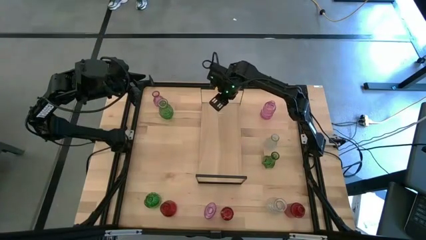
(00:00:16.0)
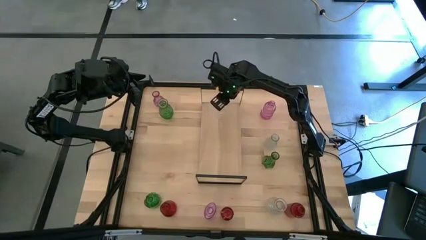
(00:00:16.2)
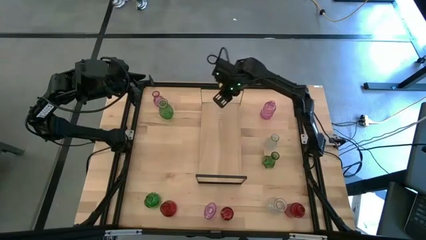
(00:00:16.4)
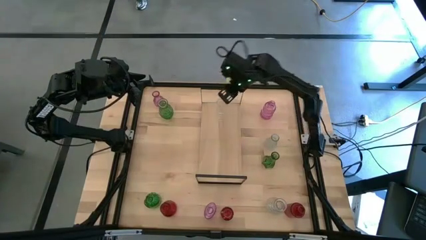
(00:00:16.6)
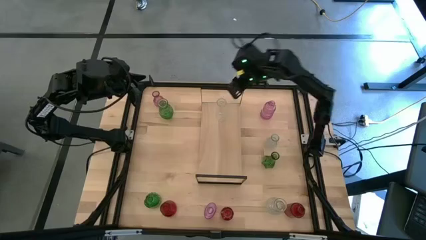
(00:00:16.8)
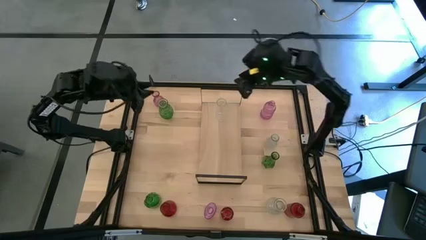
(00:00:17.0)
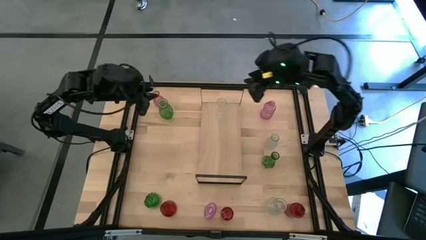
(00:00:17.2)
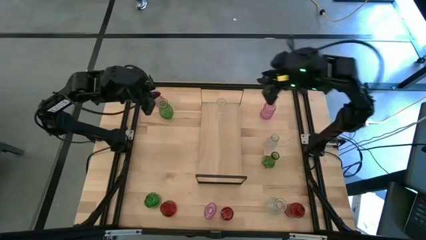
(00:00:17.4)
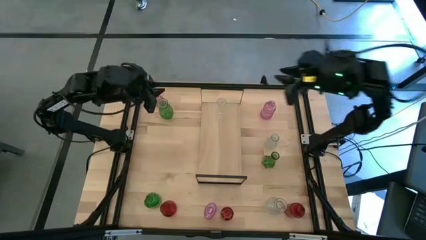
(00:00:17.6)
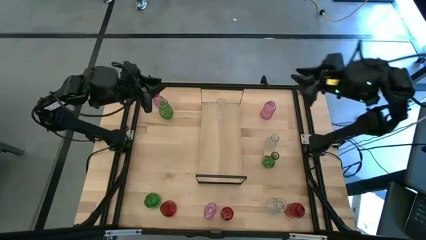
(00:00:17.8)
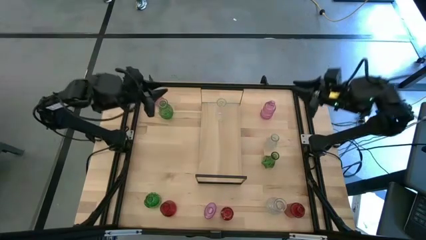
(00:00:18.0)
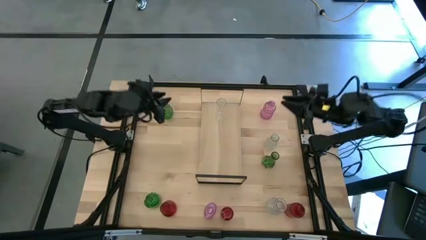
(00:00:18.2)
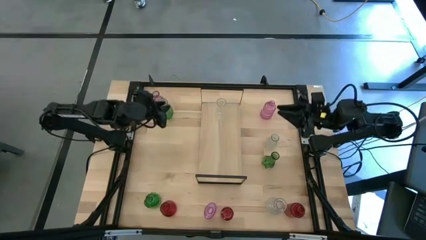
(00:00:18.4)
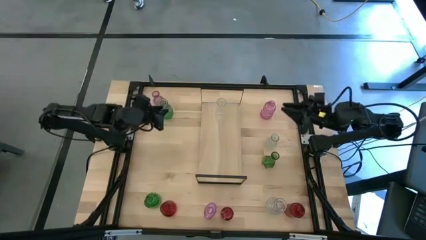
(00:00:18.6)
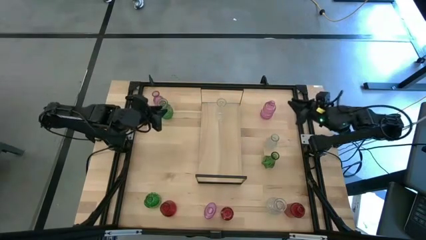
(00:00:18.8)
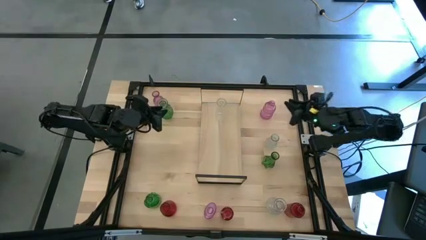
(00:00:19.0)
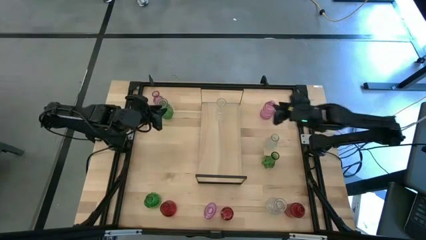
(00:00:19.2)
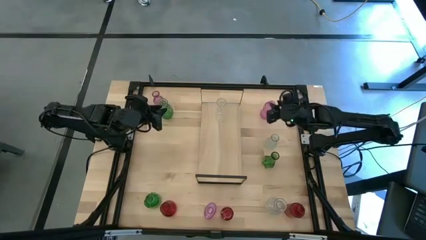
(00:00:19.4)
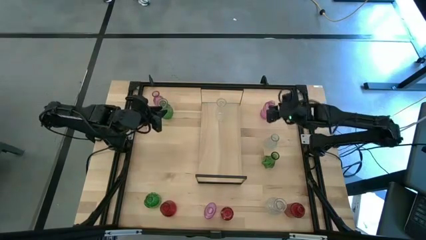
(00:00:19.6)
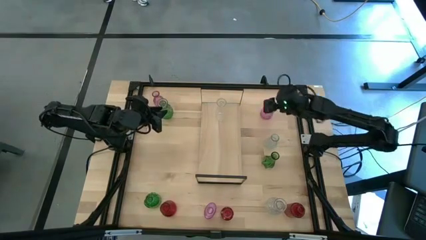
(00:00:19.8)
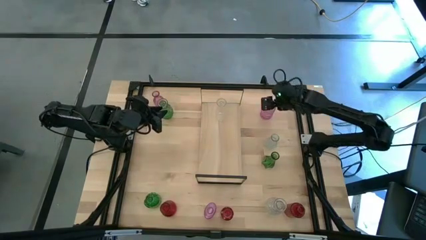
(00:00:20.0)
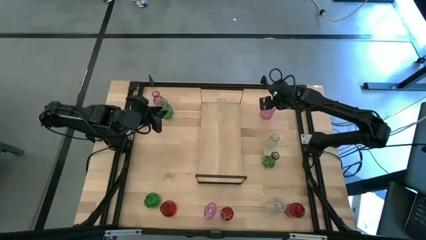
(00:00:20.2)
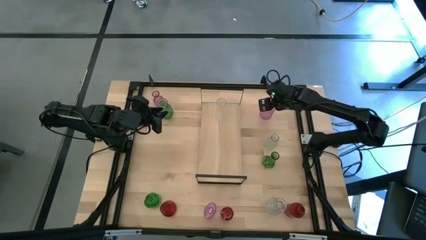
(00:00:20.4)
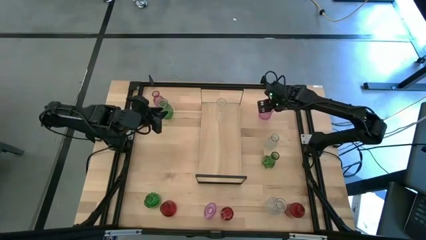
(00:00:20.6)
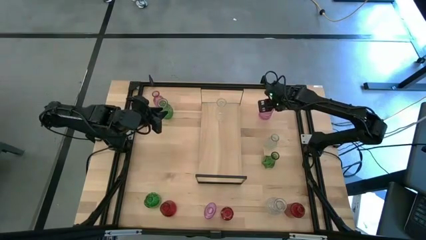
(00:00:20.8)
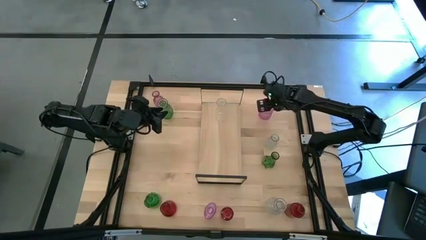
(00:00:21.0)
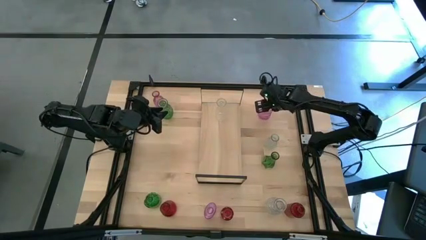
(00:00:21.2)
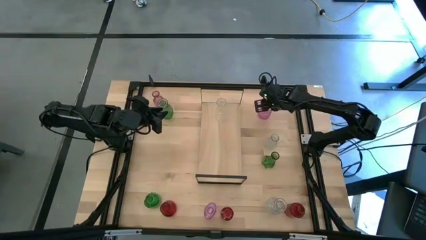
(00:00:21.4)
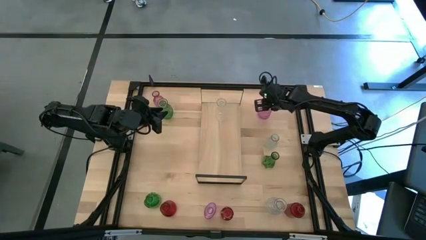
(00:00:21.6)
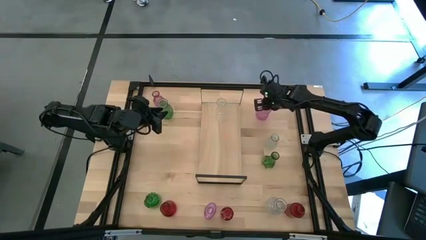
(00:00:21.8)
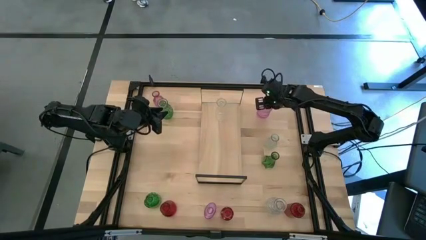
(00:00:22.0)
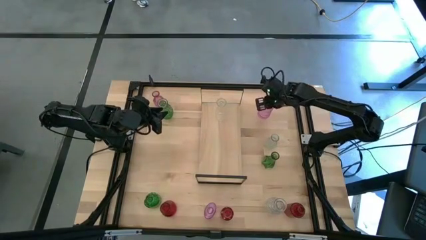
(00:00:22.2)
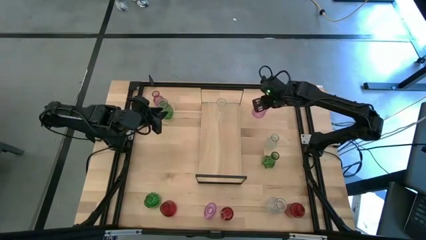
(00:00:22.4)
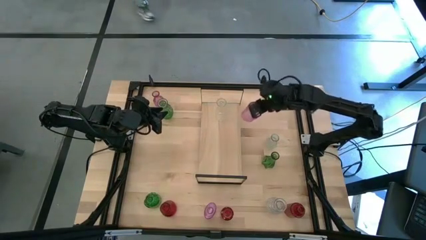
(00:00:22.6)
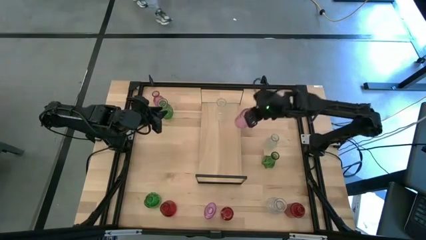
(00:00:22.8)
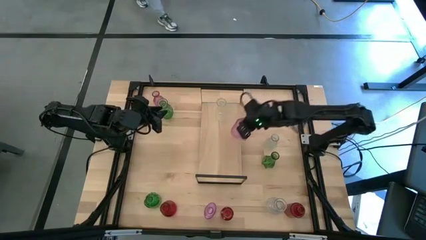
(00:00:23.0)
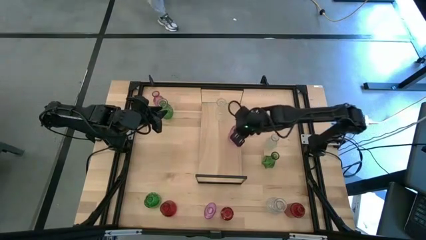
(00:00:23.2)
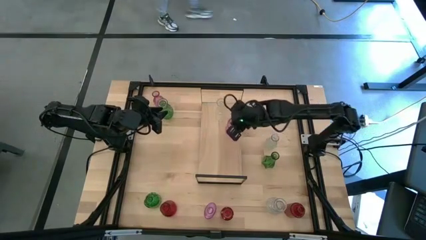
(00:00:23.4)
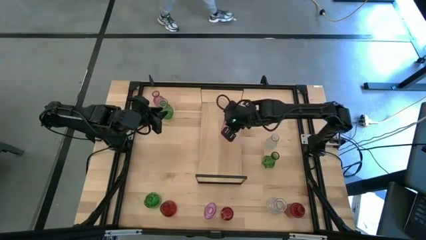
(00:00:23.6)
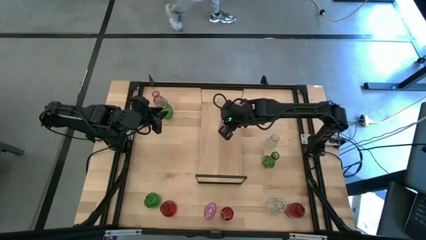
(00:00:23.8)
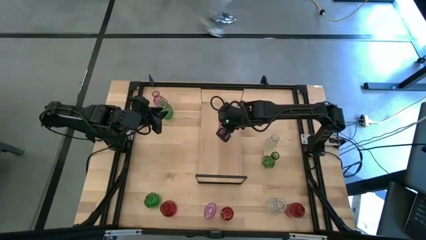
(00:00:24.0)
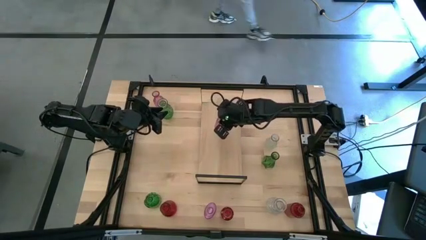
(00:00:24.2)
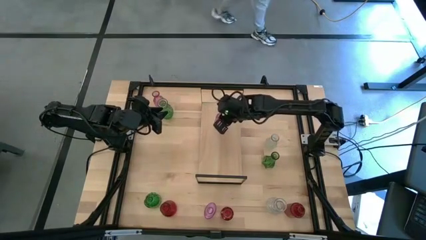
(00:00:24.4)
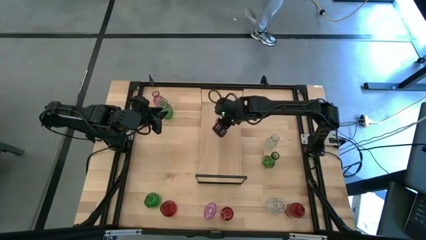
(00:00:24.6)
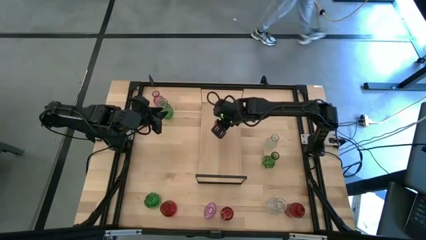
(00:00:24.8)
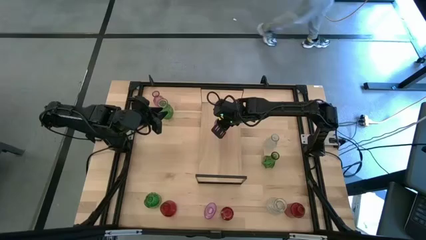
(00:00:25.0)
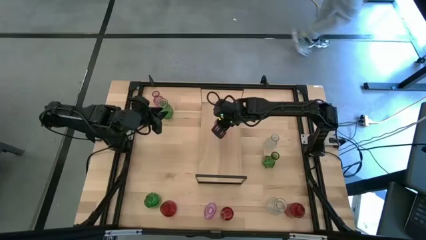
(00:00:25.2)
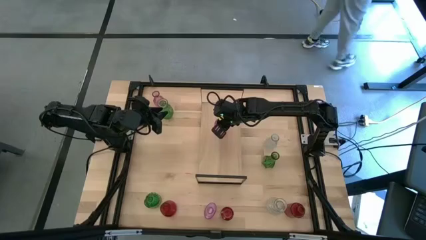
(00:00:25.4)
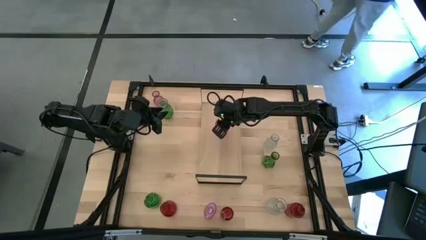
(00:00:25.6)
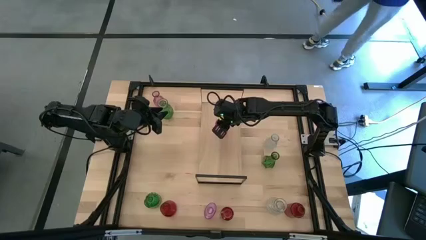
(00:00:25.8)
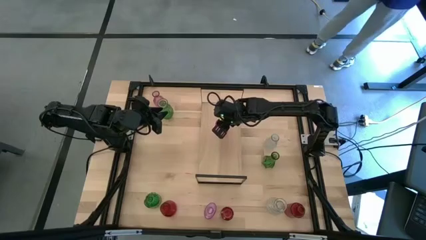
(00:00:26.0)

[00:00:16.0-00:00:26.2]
Task: sort vases onto shelf
Put the top right purple vase on the shelf
